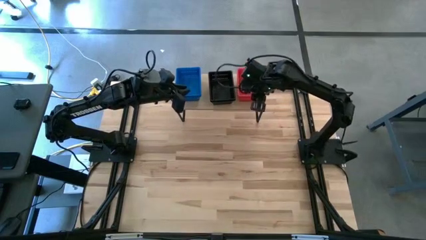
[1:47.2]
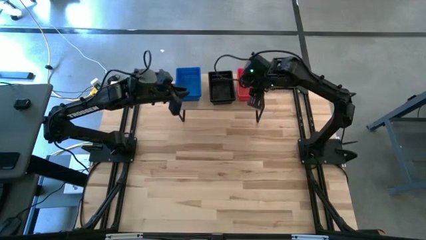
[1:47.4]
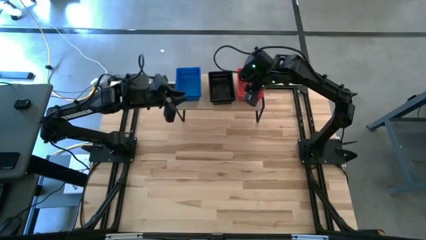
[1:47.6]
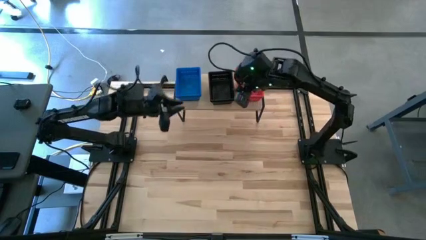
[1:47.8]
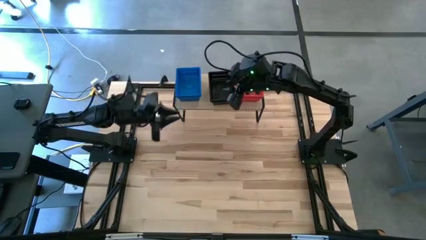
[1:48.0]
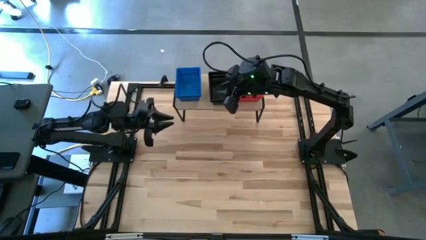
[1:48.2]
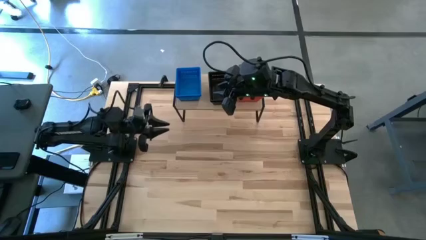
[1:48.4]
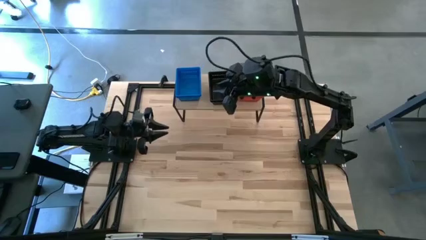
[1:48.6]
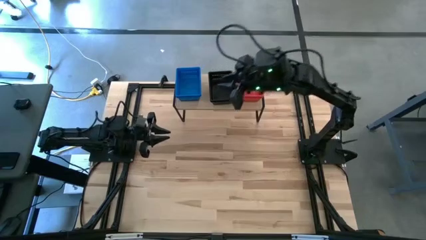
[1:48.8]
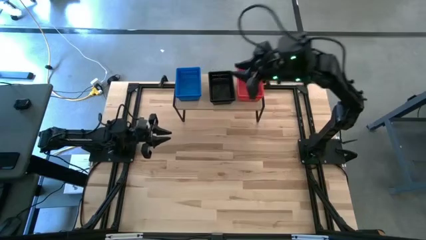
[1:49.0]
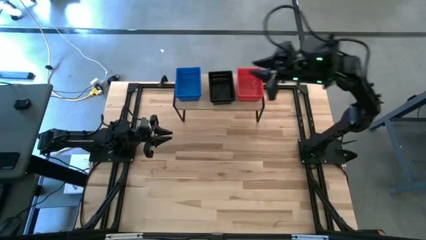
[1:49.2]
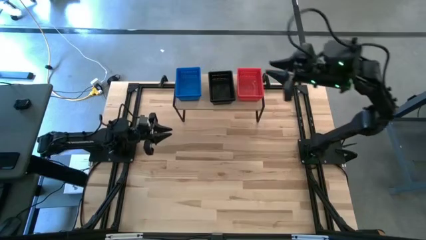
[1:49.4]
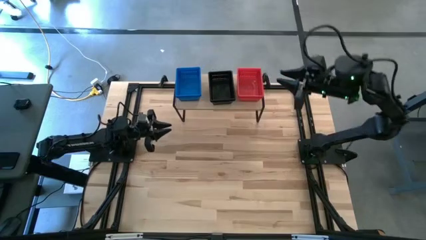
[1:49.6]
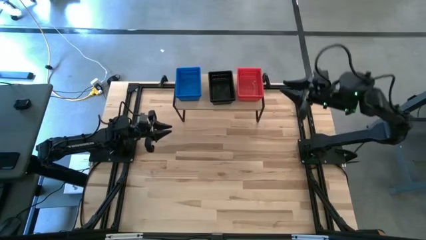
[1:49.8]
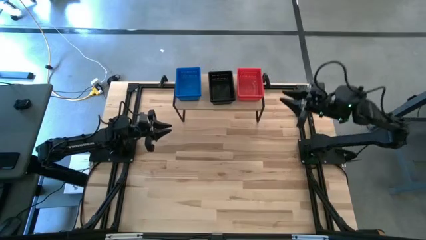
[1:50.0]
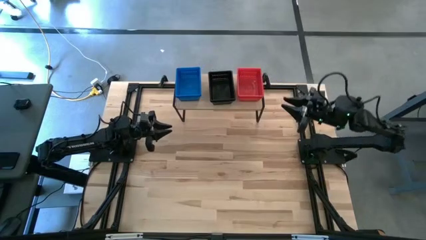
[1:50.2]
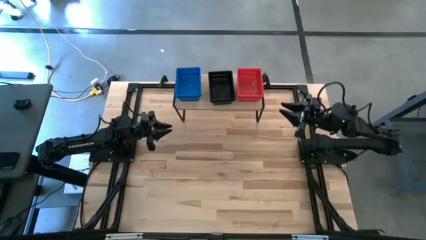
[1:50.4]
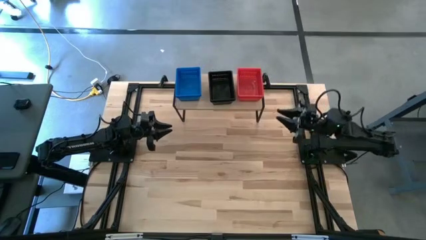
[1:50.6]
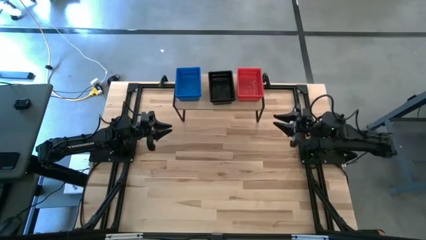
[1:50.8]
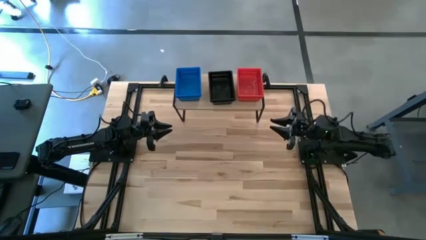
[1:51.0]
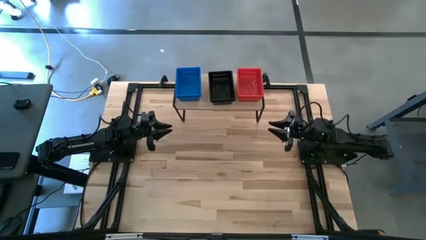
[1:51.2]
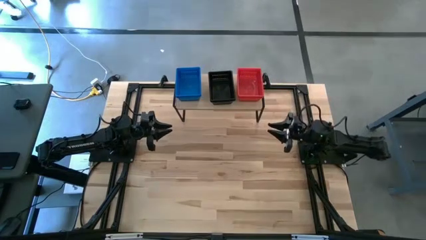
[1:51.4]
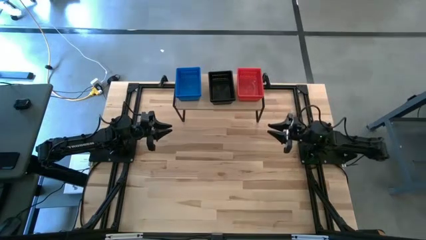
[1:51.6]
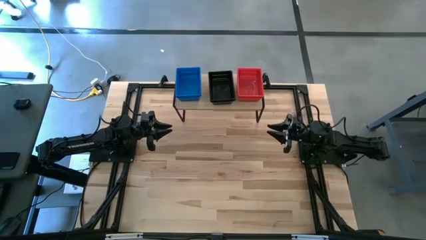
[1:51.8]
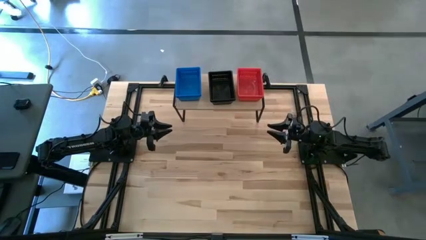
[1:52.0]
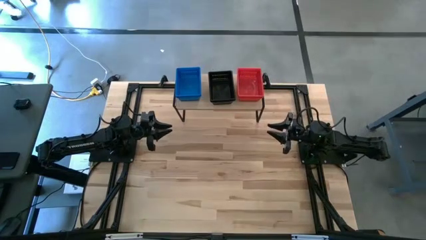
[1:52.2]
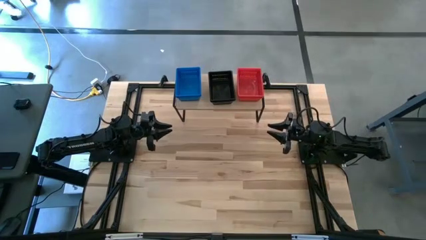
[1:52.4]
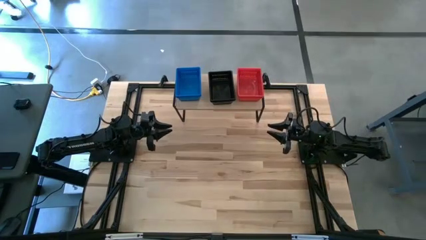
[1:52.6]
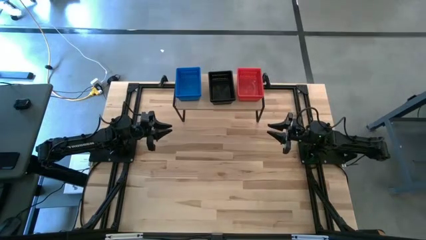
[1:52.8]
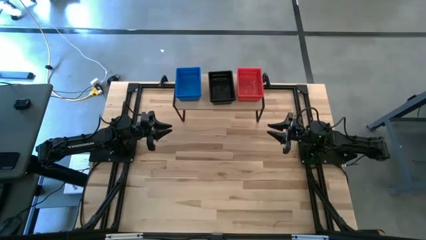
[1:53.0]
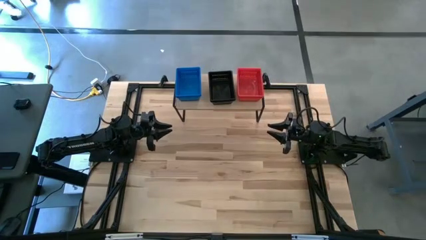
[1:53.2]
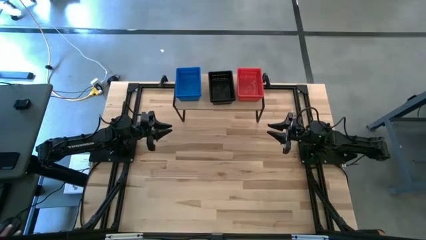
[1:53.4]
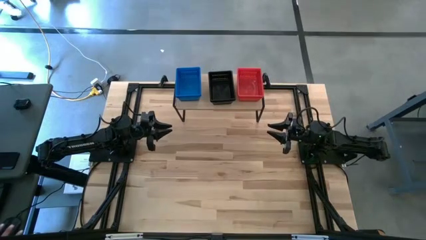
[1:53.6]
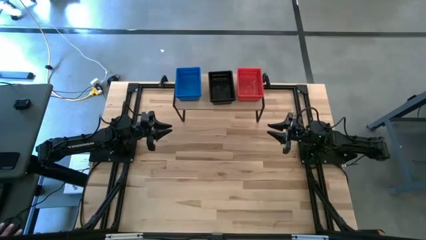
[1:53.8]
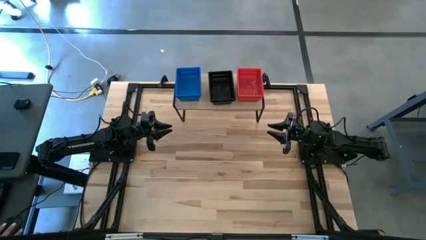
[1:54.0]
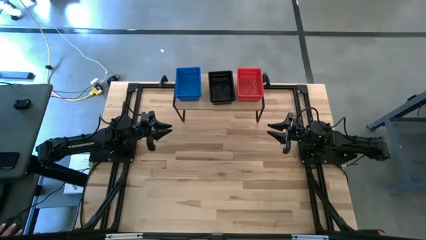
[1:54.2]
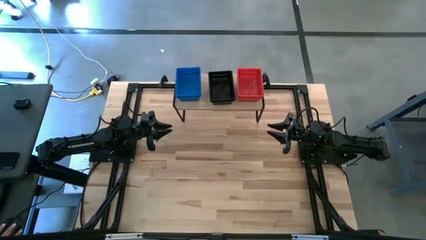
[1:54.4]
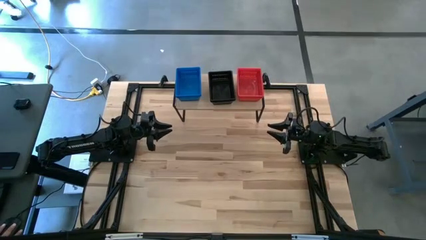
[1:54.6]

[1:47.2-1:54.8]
Task: Stack baskets on shelf by color
Return to Home Position

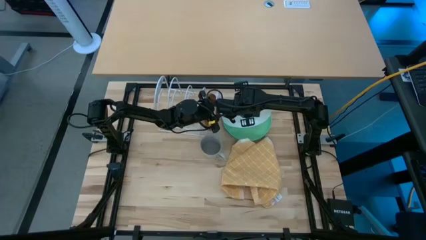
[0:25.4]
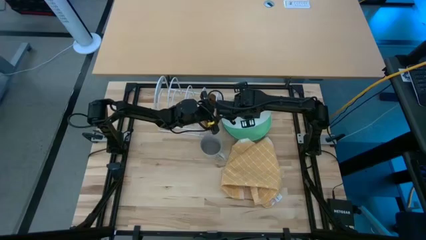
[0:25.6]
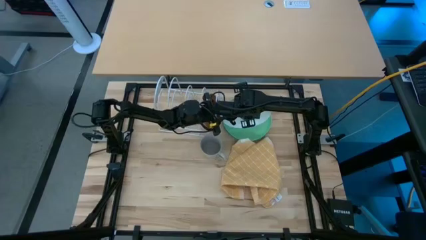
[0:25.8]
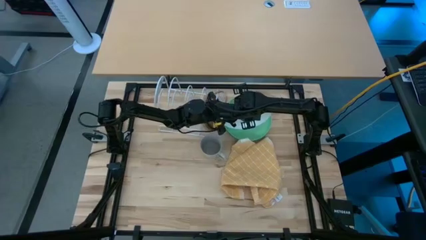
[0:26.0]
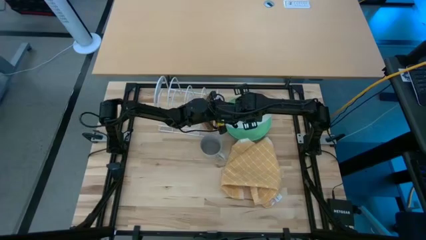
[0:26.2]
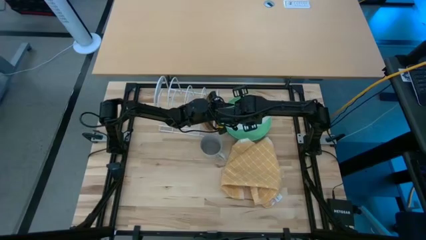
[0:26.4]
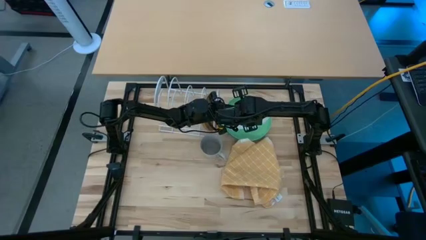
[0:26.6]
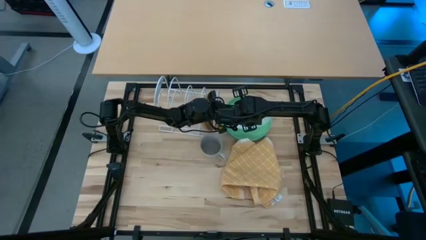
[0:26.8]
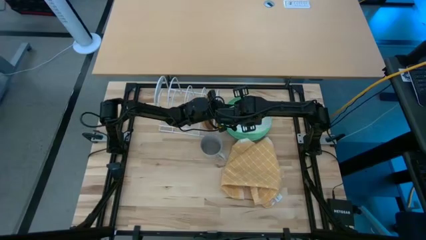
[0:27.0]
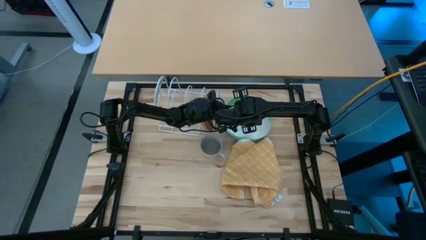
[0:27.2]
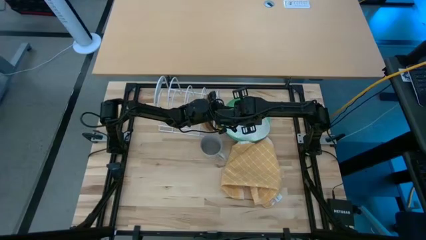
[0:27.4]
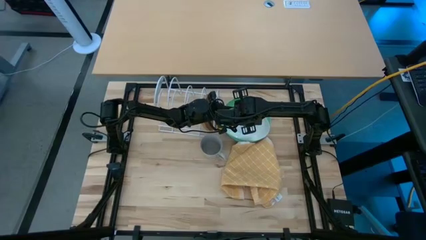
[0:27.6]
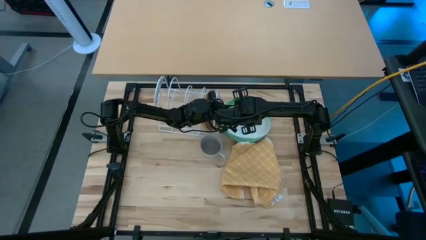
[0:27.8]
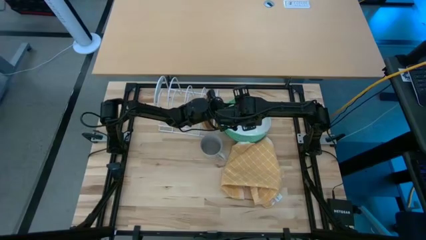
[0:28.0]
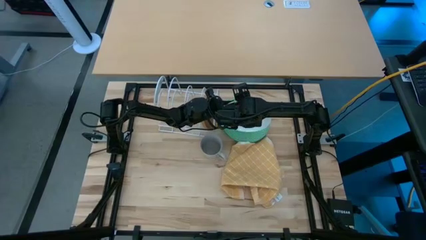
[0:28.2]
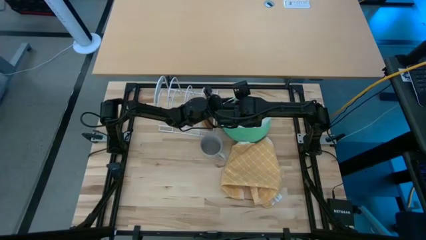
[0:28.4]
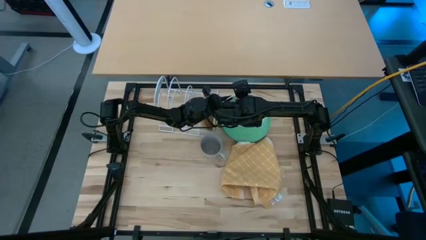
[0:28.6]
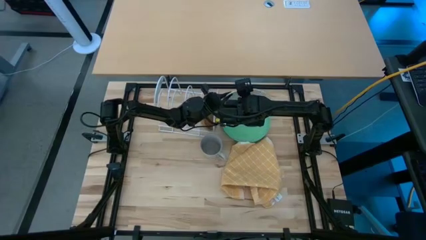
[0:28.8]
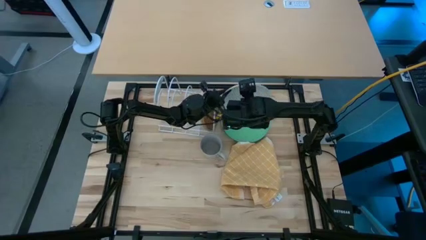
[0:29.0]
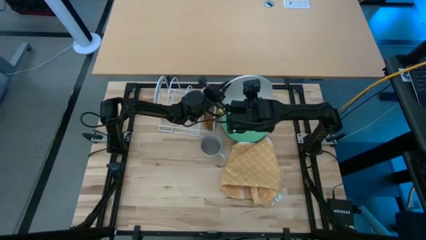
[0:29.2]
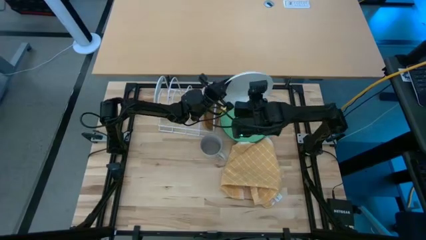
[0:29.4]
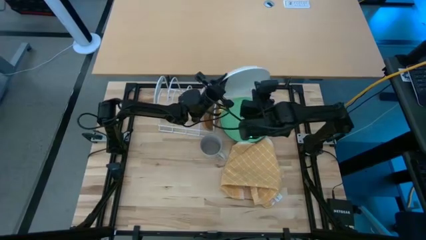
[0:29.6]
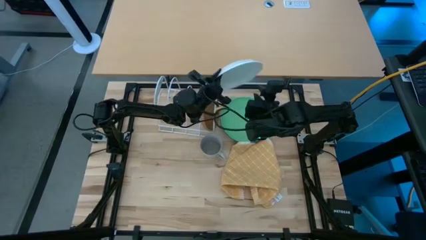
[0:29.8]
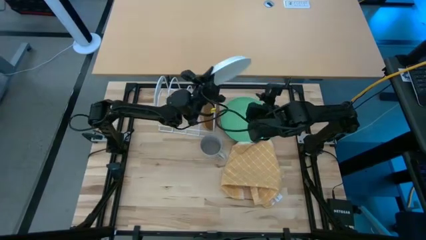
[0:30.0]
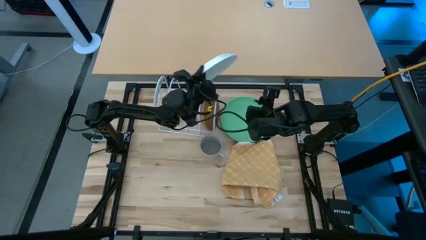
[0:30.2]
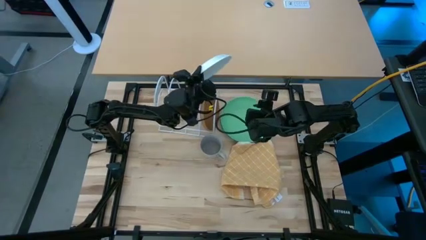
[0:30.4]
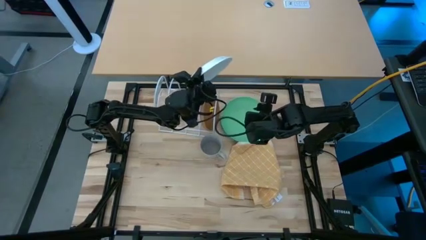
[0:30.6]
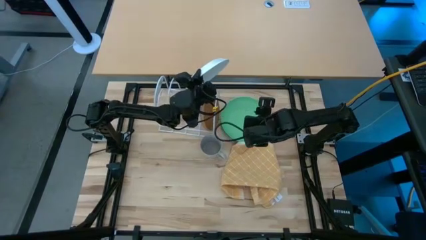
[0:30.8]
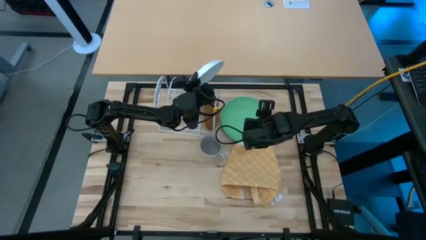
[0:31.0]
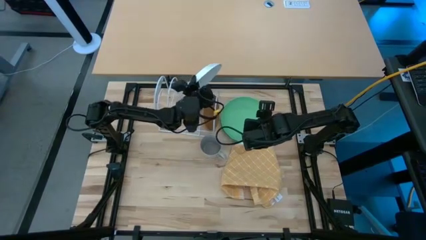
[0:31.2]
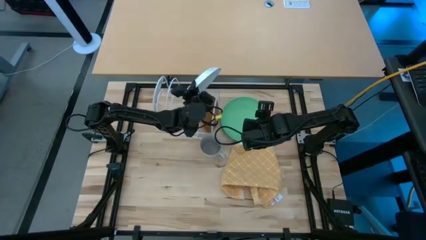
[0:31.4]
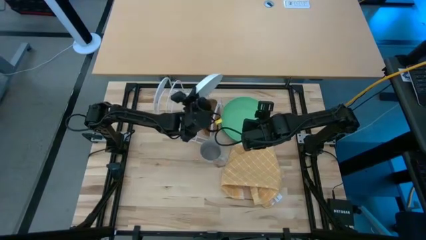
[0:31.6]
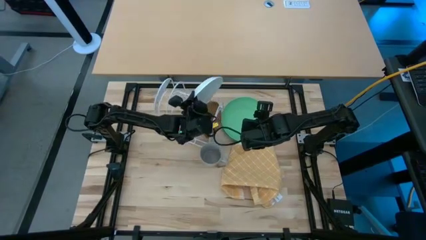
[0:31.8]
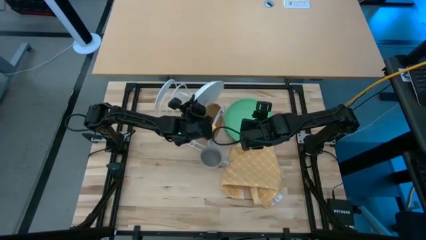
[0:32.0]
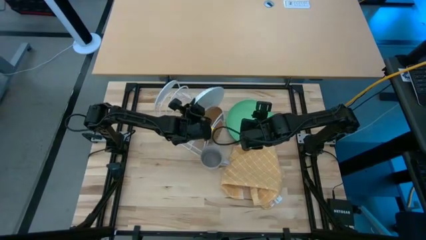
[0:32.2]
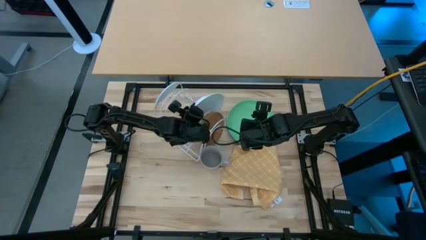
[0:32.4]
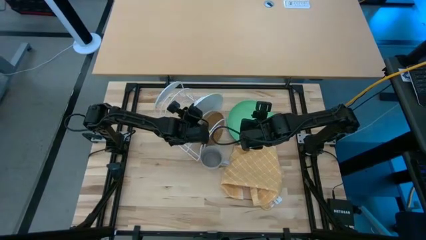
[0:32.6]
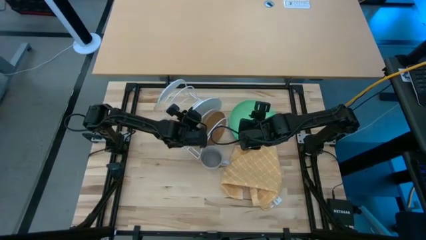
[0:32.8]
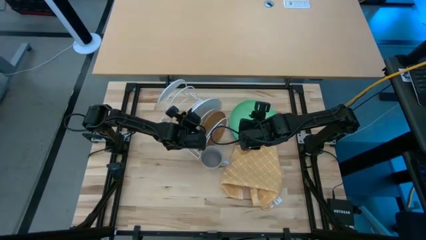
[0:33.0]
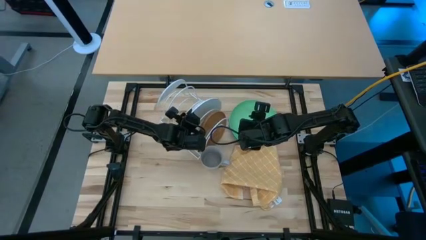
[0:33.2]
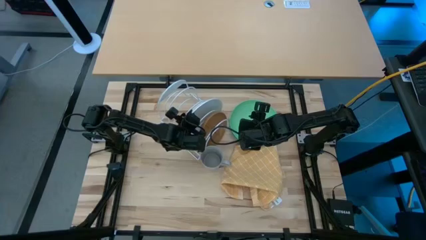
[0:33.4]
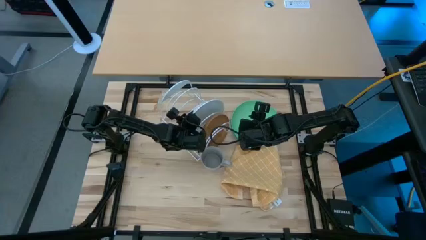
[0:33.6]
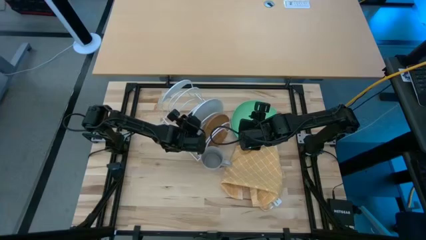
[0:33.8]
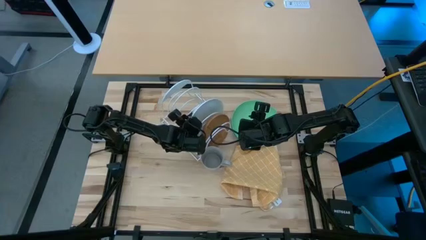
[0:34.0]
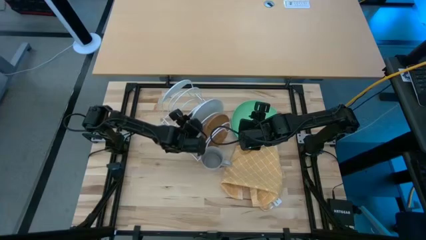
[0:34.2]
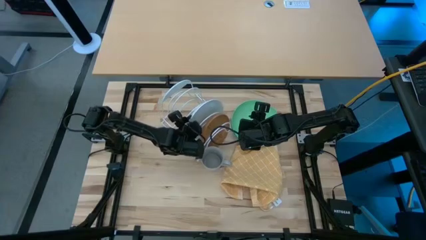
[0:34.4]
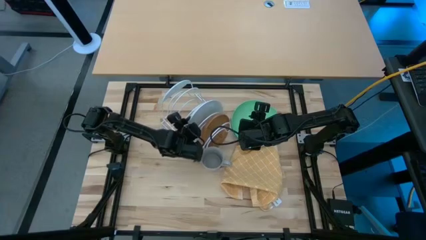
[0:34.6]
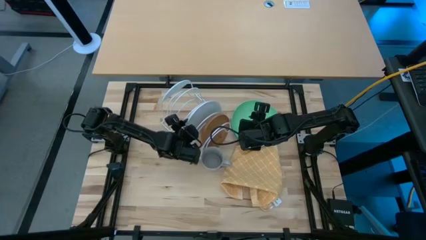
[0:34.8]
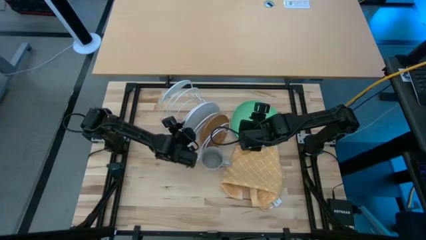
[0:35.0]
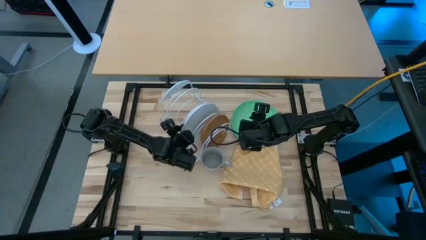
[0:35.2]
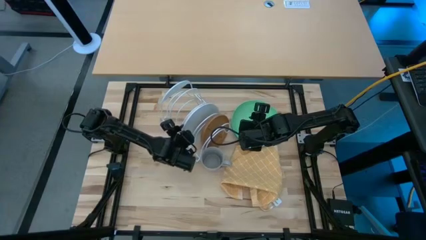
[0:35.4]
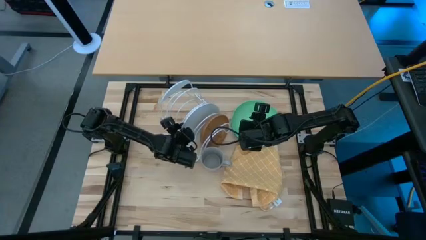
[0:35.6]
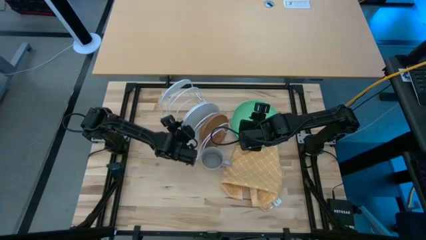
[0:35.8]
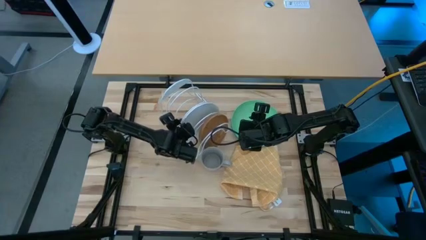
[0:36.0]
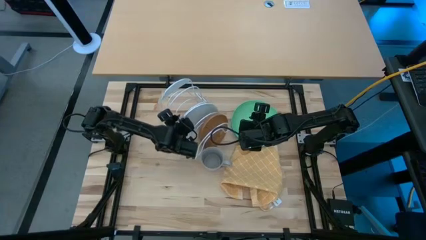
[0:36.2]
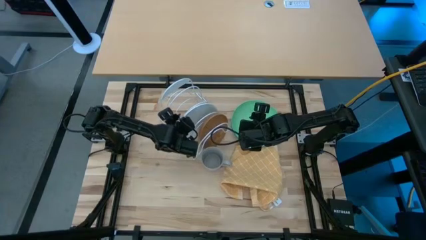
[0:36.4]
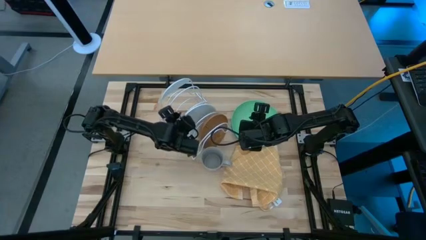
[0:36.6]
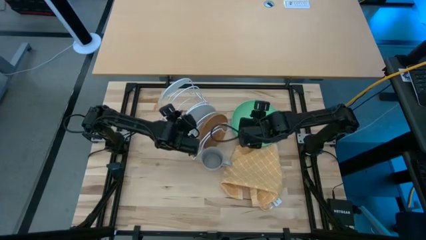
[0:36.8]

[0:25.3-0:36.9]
Task: Sort dishes
Put the white plate in the dish rack
